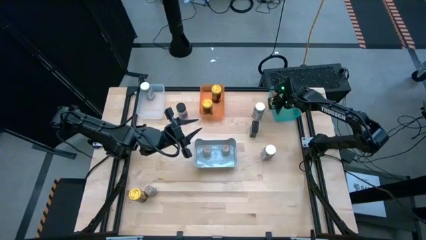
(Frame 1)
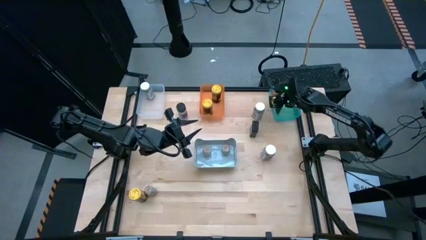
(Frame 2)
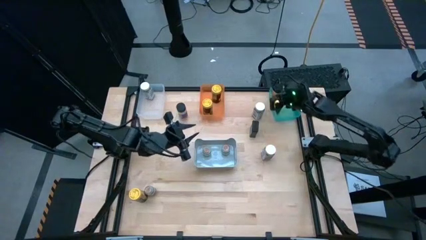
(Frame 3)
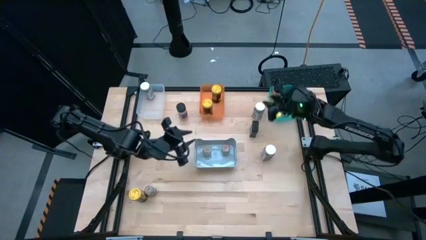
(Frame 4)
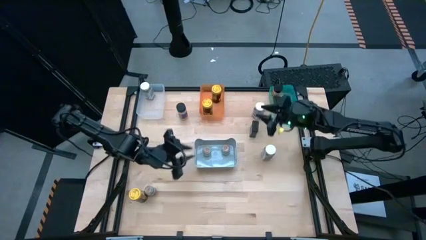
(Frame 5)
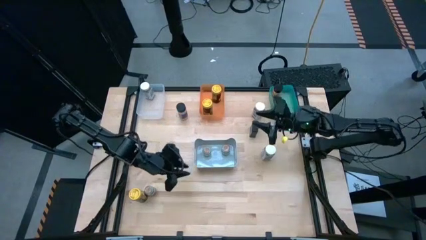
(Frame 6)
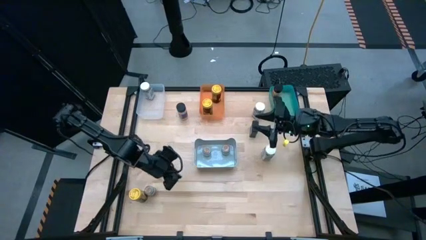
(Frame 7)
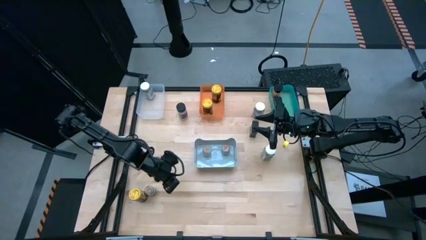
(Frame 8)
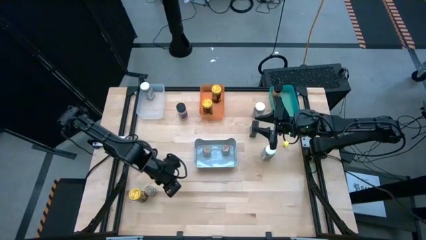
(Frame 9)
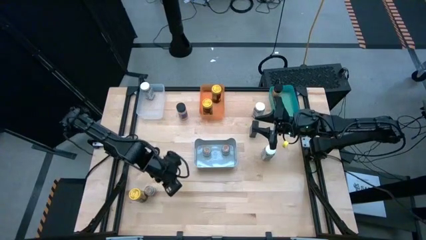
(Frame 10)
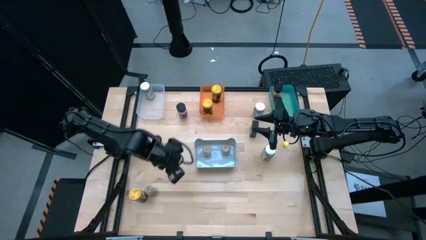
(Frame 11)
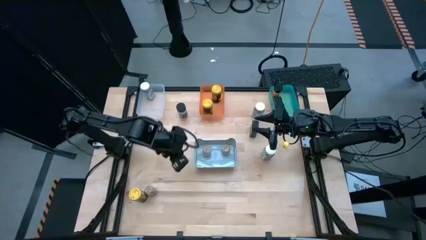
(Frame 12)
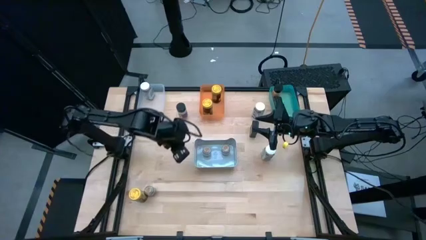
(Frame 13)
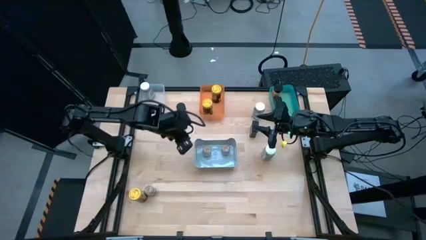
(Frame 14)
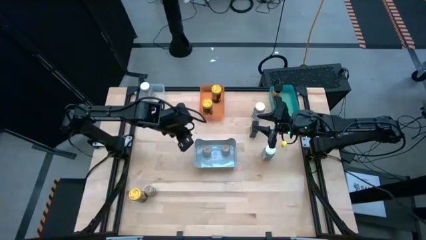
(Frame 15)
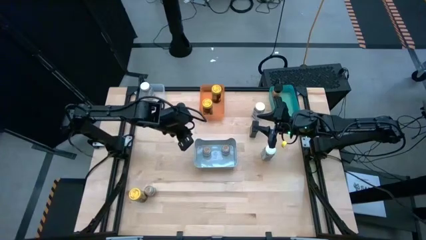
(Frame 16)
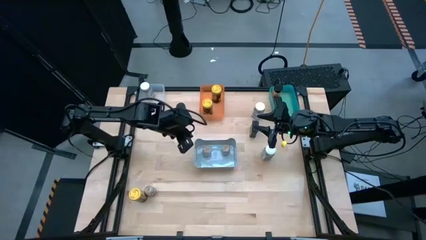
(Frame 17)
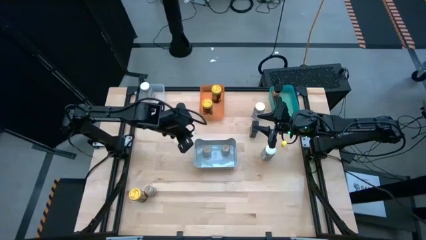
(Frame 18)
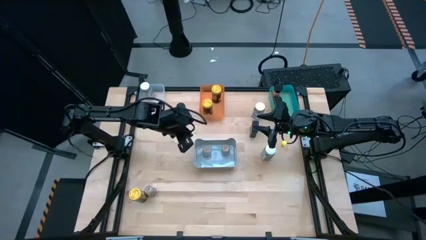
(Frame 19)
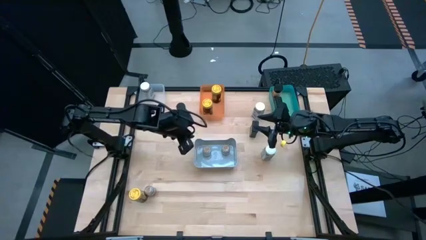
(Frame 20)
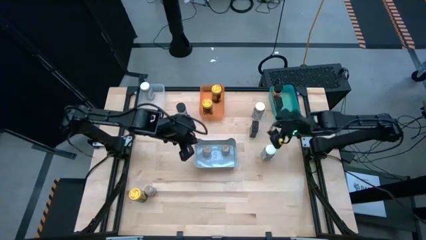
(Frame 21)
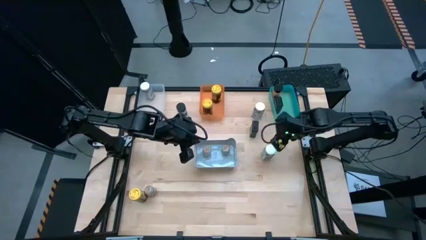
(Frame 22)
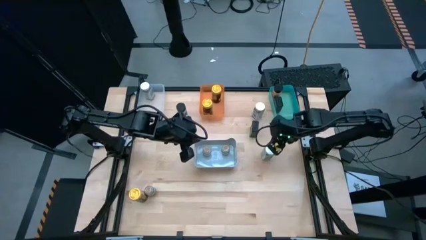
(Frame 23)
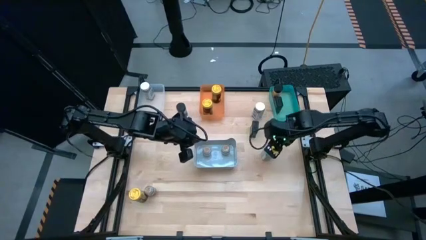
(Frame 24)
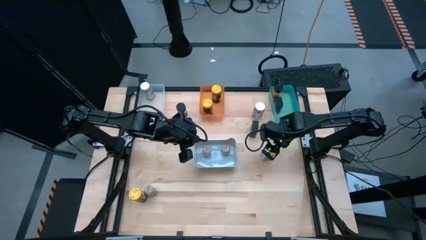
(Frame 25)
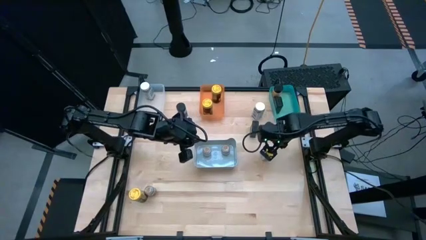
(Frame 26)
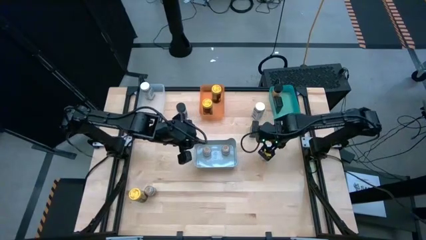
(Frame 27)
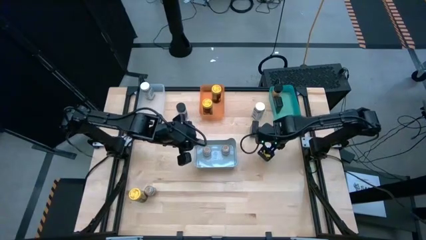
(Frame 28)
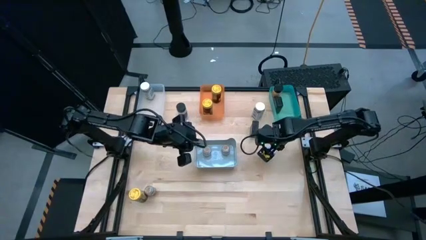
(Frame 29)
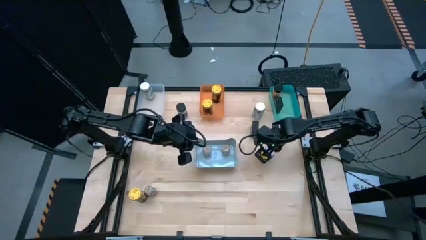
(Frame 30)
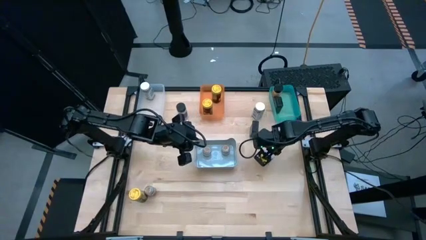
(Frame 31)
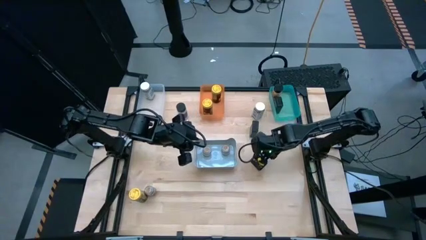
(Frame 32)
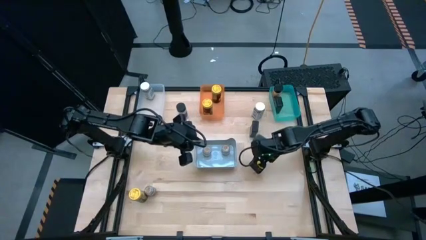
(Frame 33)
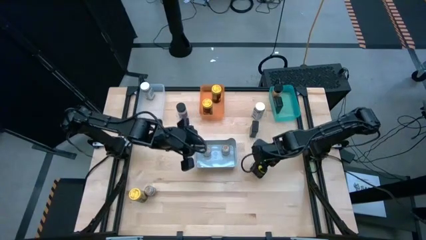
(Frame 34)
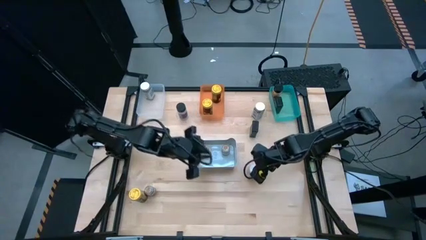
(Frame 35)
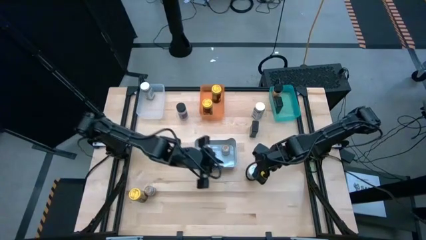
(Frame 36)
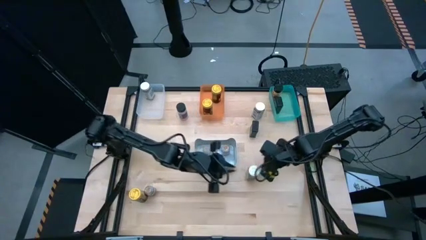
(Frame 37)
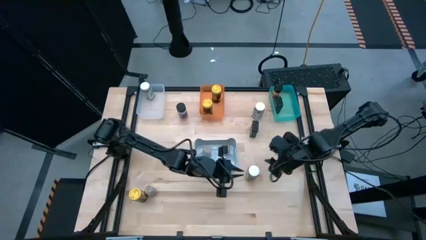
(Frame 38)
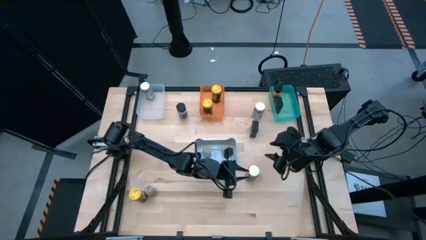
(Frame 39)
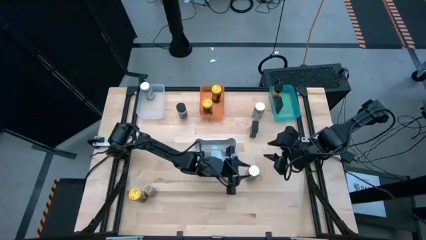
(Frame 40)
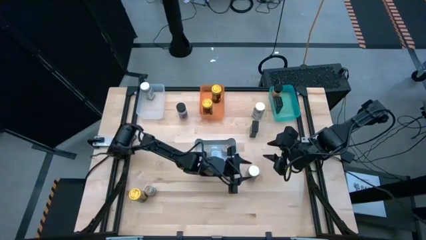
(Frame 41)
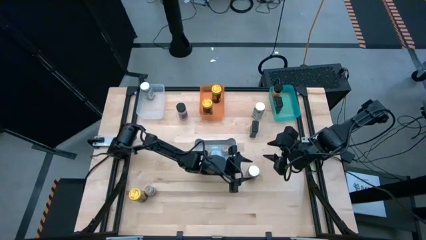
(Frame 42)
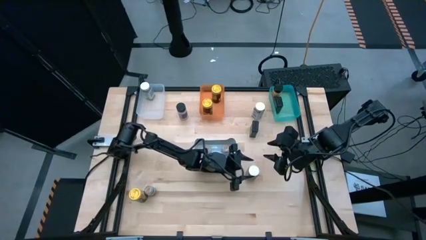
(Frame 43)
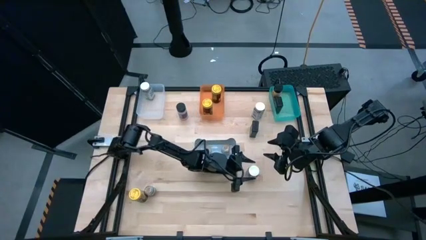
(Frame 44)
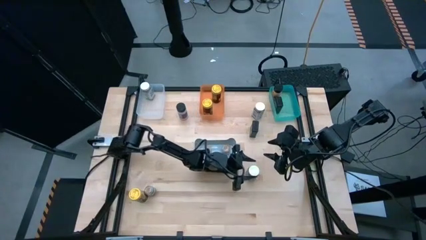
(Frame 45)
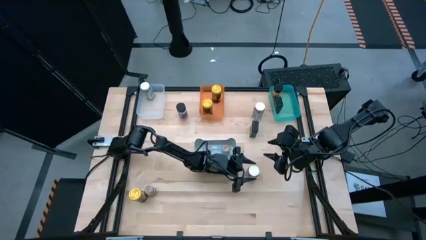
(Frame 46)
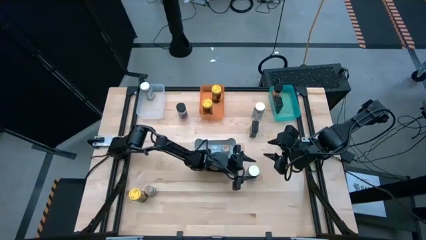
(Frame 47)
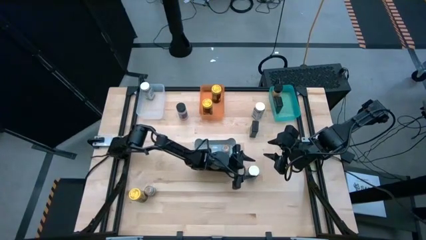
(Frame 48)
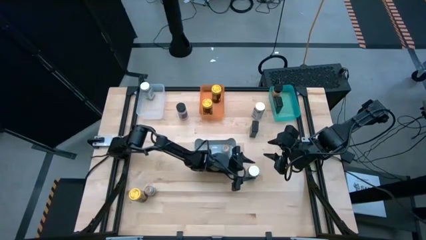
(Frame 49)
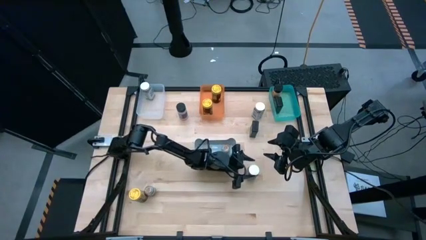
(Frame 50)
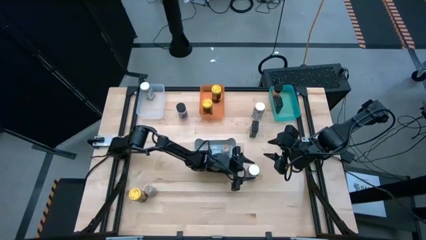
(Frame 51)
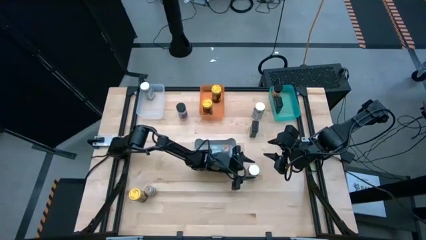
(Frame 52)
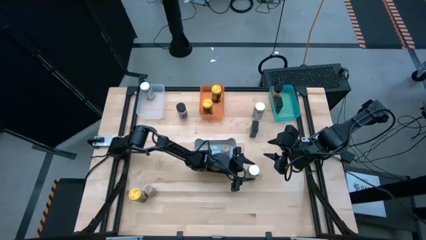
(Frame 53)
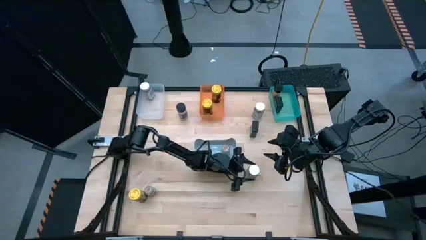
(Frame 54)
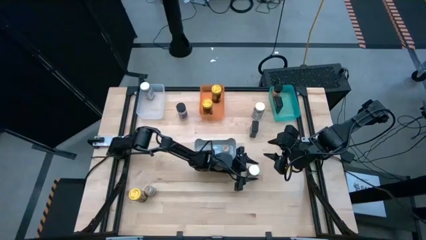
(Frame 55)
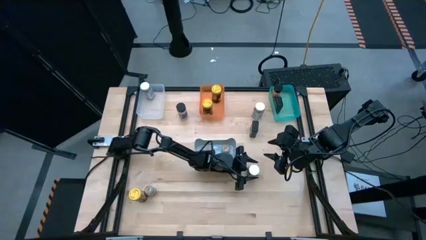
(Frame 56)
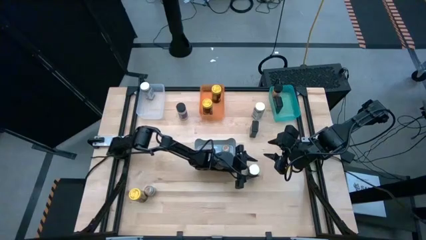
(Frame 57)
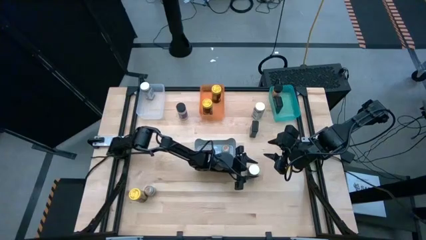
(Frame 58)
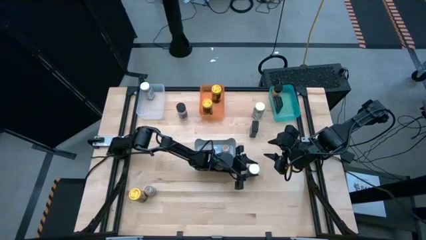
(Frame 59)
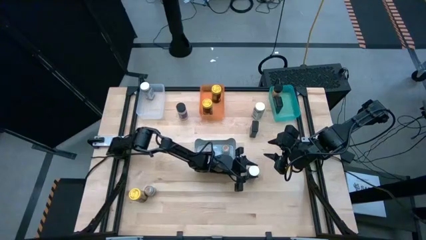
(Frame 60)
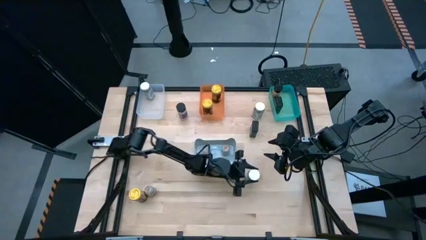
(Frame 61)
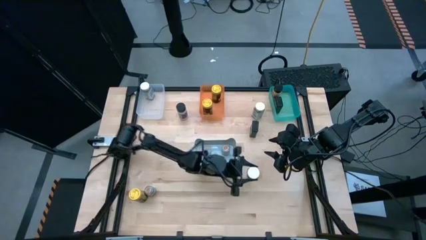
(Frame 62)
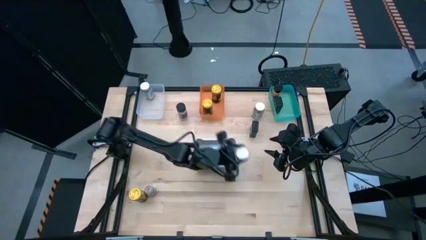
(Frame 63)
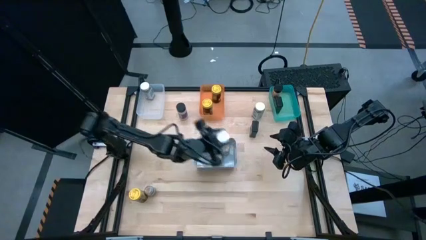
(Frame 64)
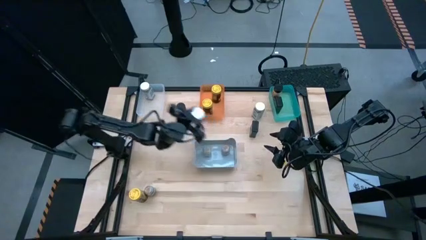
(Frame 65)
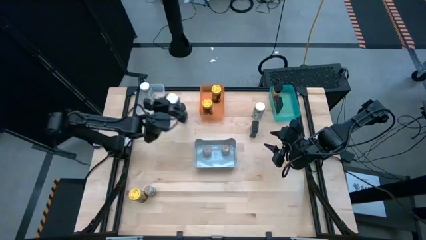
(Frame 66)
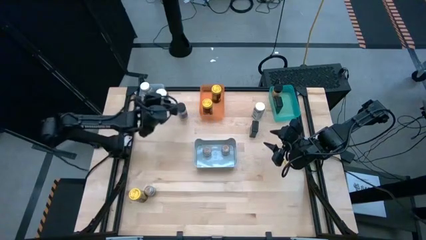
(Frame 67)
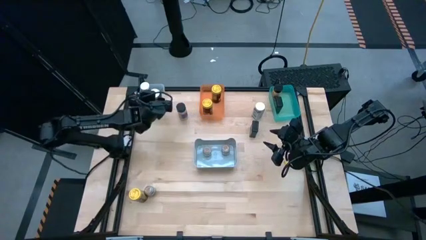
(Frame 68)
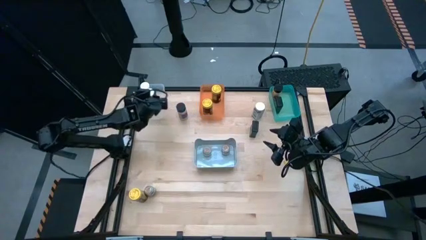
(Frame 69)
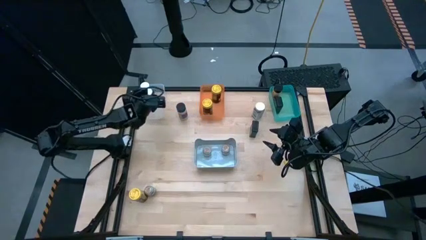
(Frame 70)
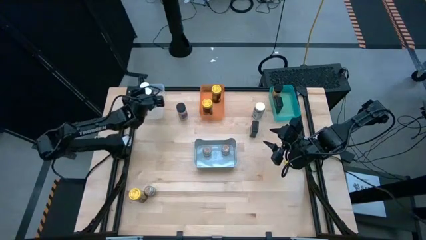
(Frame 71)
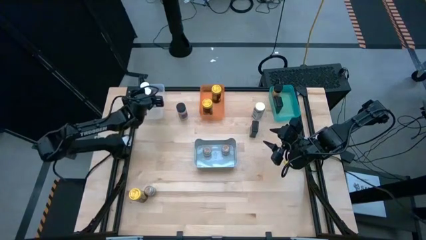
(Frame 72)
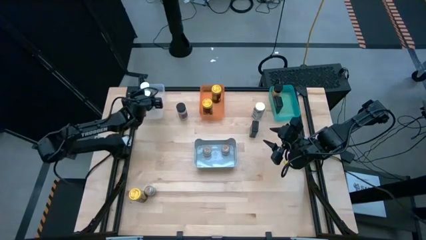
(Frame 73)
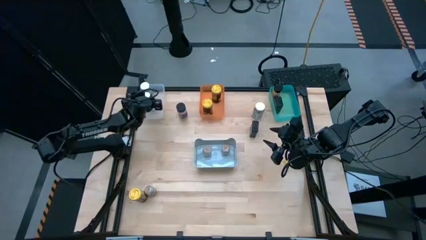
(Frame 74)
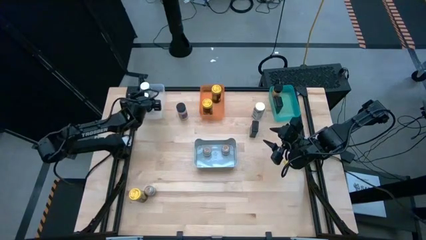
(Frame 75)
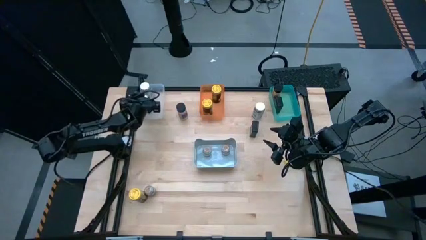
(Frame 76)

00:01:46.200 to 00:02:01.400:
Task: Sort spices by type
Put the bottom white seasoning bottle into the transparent bin
